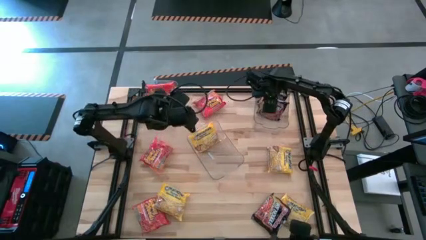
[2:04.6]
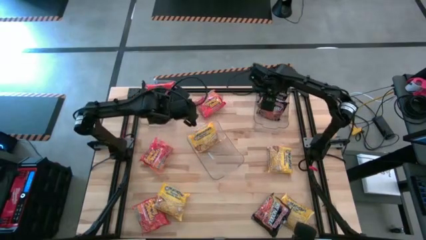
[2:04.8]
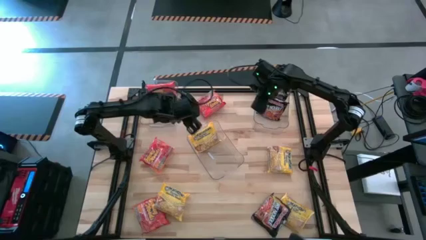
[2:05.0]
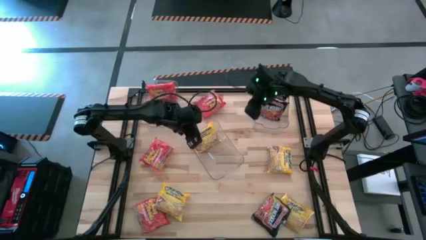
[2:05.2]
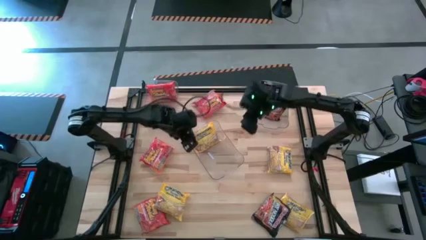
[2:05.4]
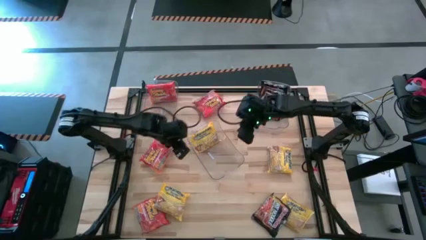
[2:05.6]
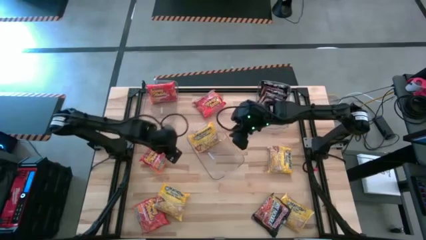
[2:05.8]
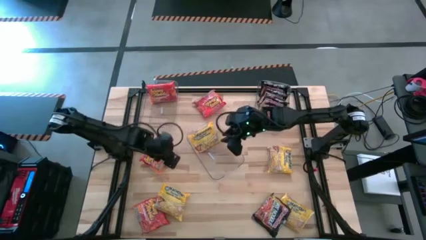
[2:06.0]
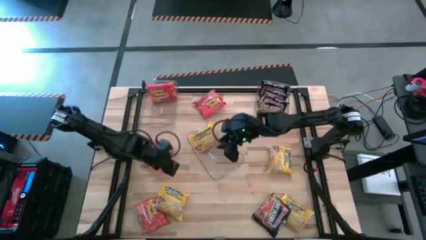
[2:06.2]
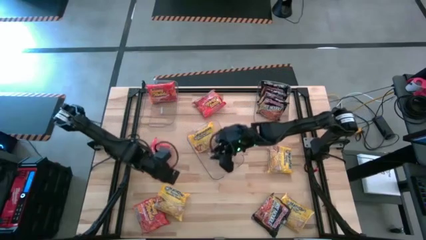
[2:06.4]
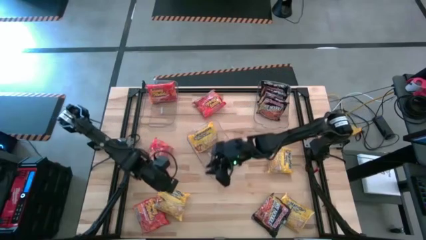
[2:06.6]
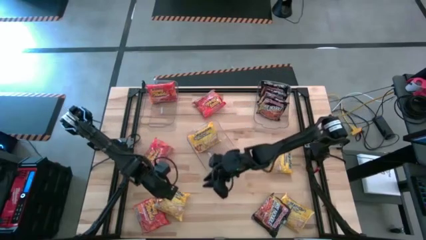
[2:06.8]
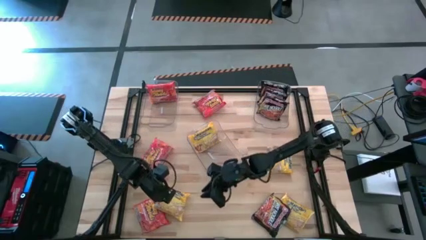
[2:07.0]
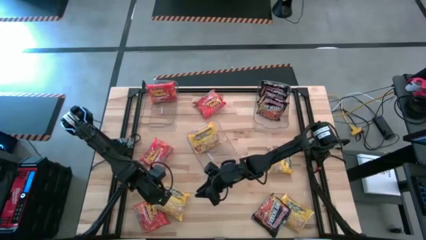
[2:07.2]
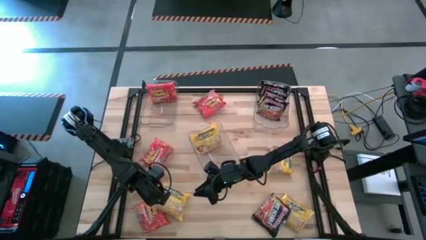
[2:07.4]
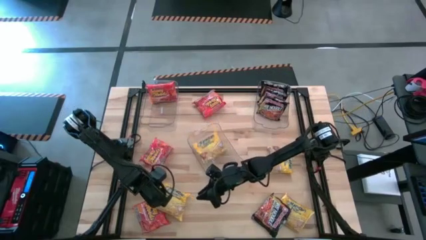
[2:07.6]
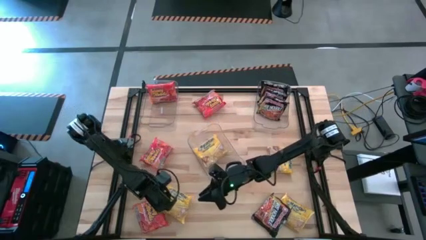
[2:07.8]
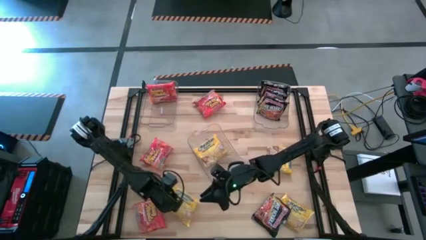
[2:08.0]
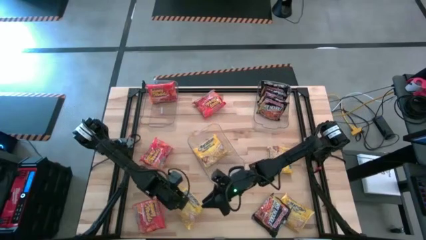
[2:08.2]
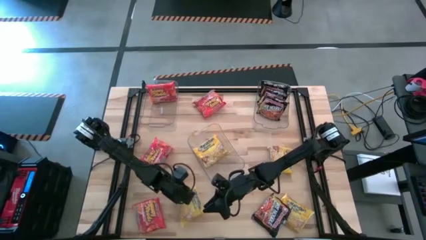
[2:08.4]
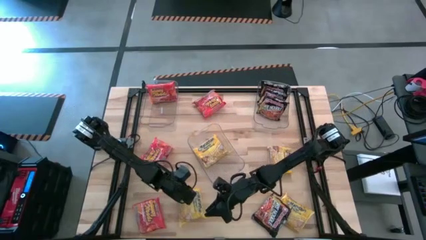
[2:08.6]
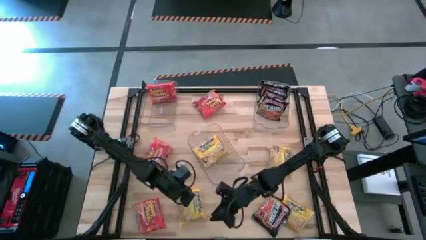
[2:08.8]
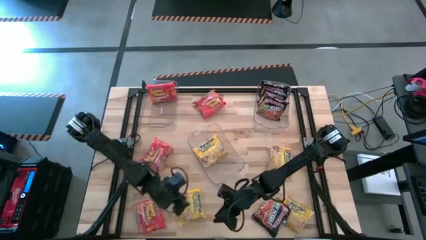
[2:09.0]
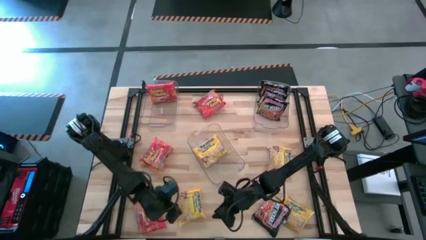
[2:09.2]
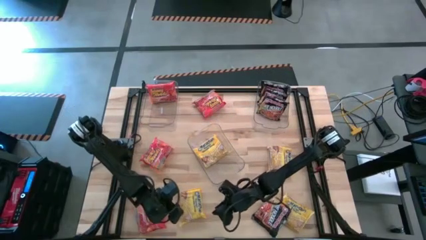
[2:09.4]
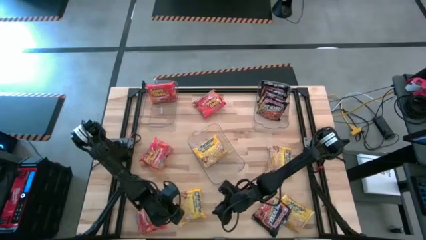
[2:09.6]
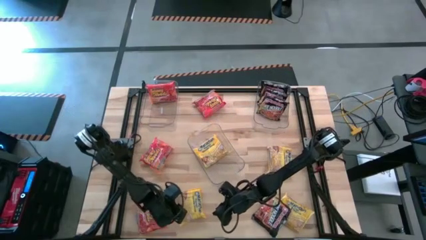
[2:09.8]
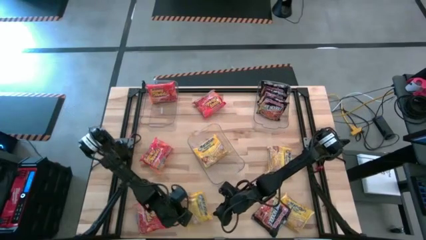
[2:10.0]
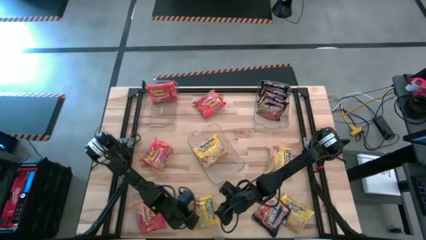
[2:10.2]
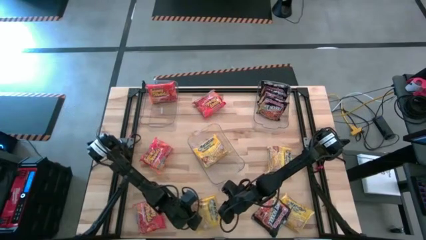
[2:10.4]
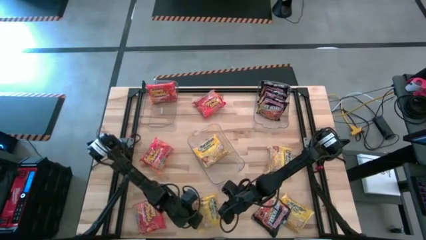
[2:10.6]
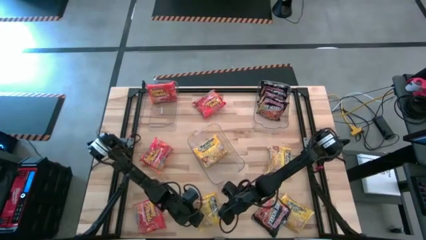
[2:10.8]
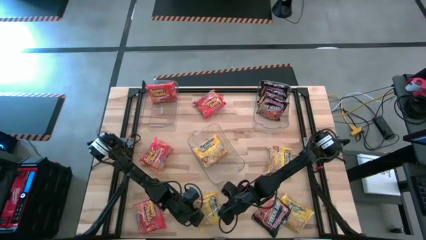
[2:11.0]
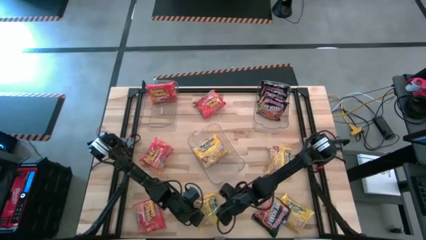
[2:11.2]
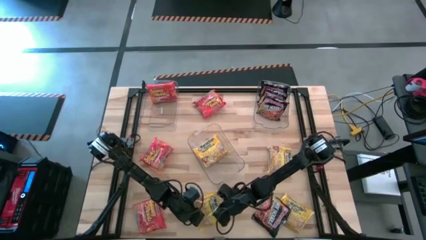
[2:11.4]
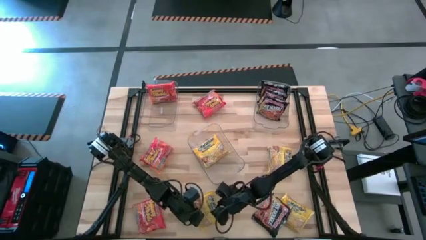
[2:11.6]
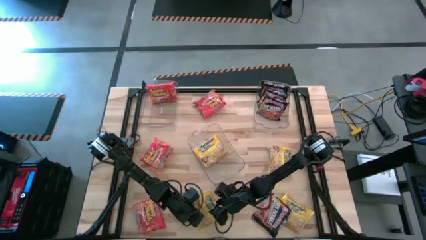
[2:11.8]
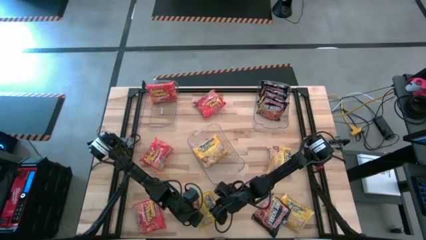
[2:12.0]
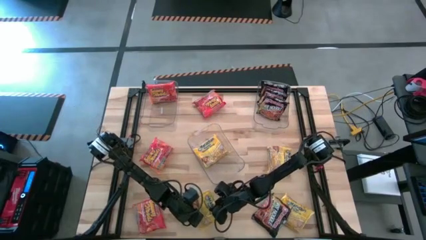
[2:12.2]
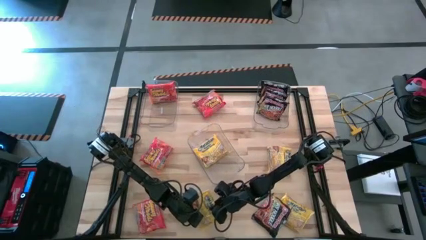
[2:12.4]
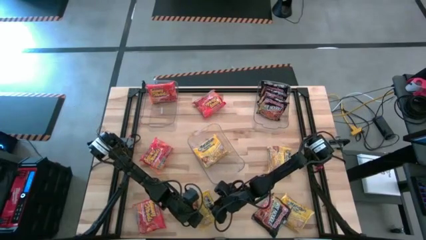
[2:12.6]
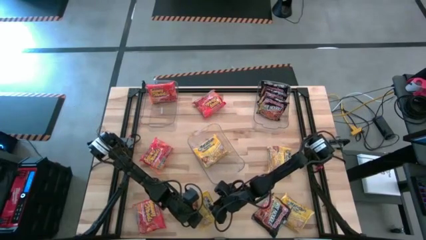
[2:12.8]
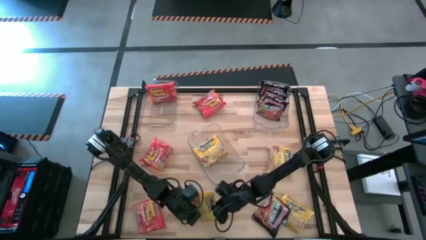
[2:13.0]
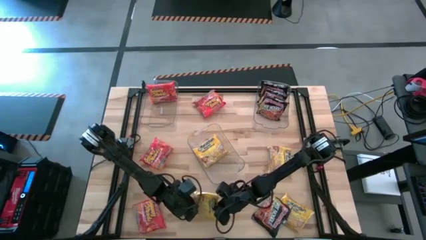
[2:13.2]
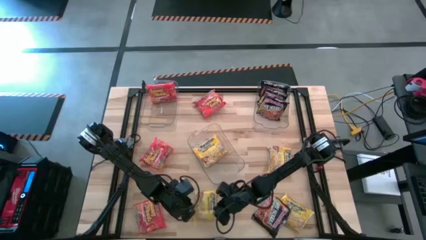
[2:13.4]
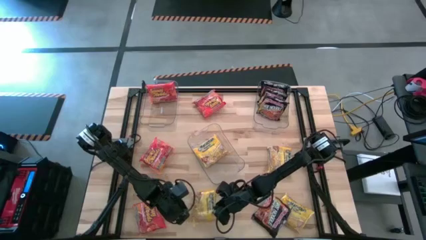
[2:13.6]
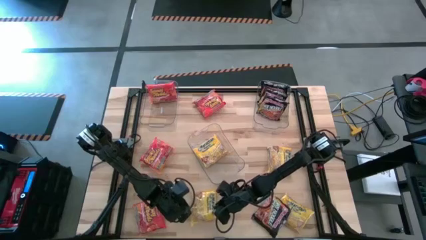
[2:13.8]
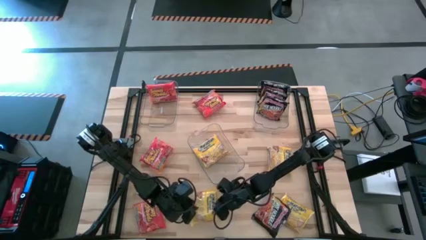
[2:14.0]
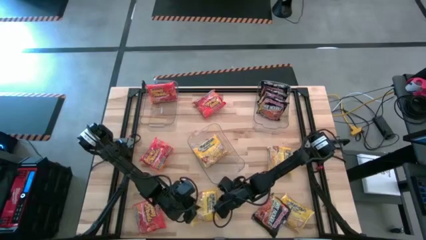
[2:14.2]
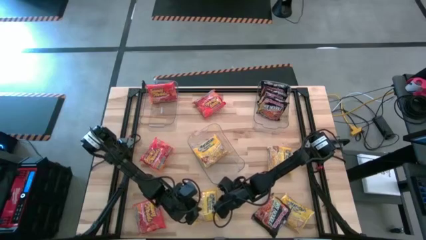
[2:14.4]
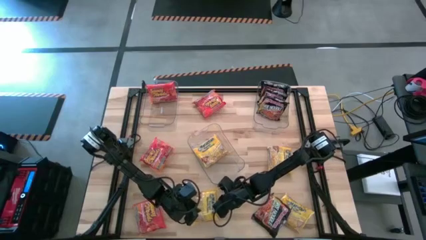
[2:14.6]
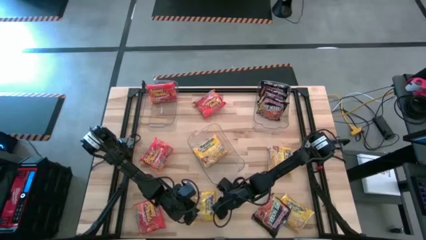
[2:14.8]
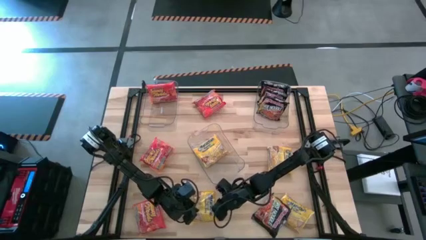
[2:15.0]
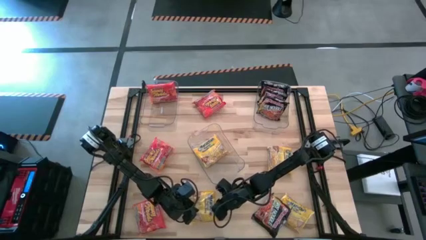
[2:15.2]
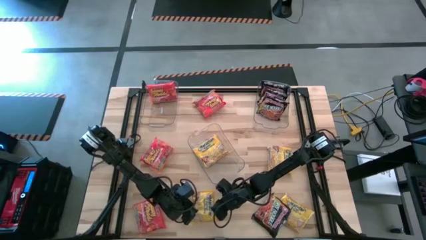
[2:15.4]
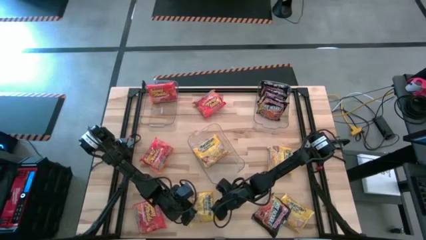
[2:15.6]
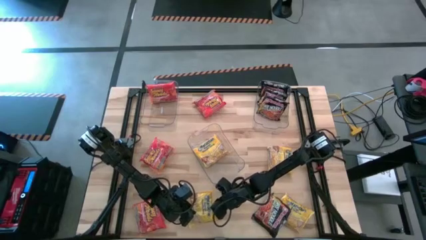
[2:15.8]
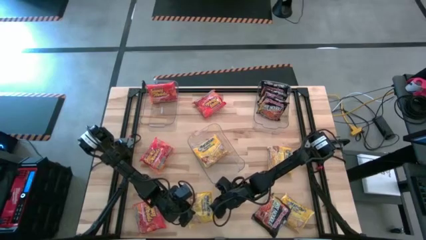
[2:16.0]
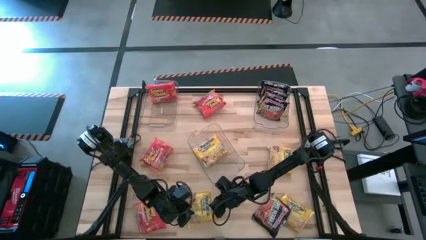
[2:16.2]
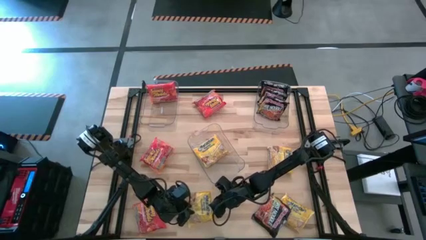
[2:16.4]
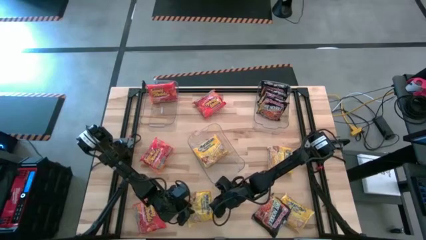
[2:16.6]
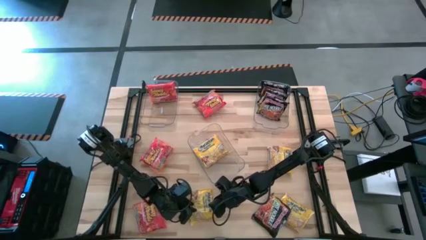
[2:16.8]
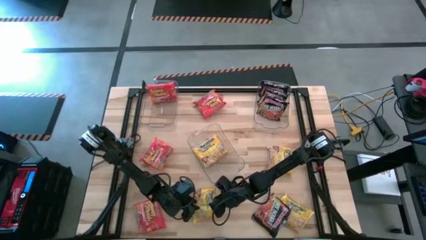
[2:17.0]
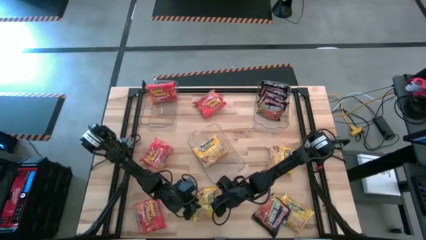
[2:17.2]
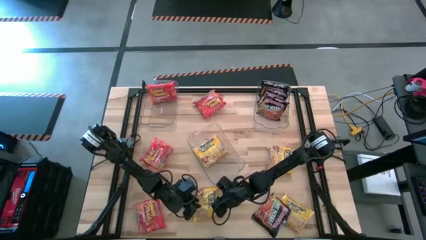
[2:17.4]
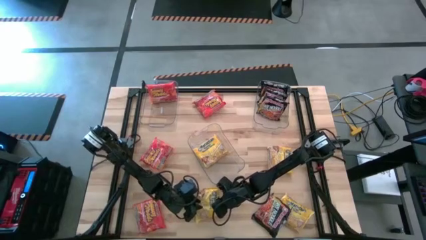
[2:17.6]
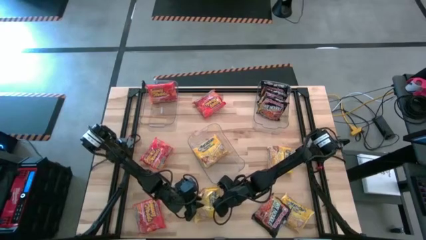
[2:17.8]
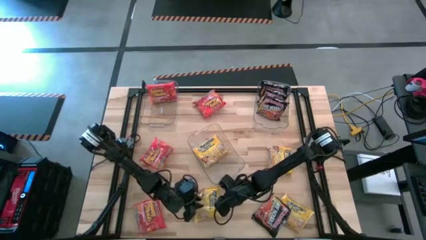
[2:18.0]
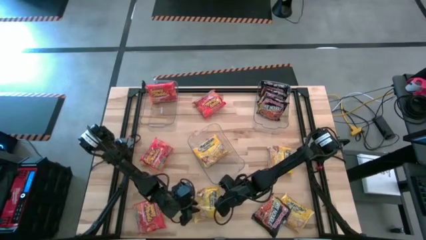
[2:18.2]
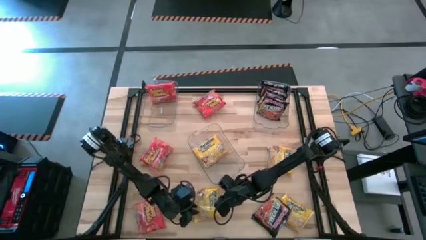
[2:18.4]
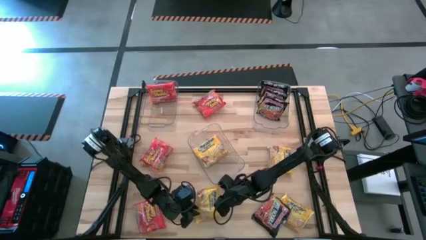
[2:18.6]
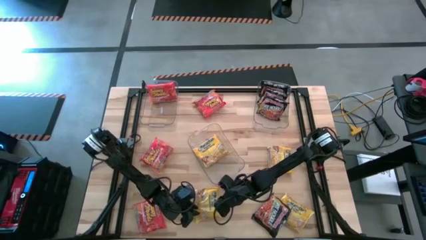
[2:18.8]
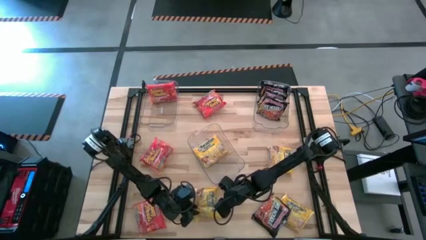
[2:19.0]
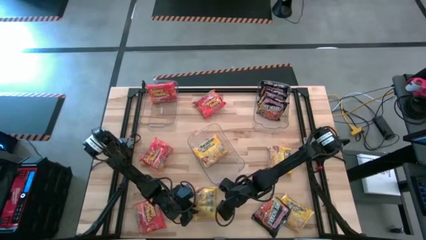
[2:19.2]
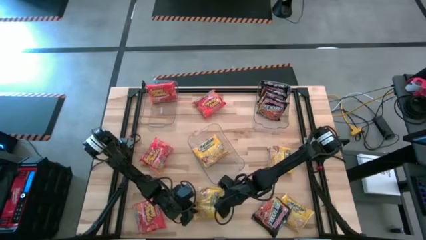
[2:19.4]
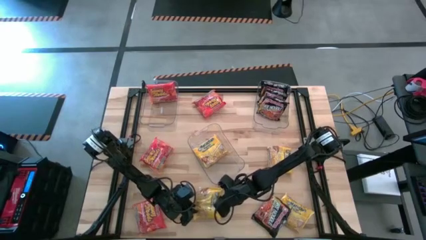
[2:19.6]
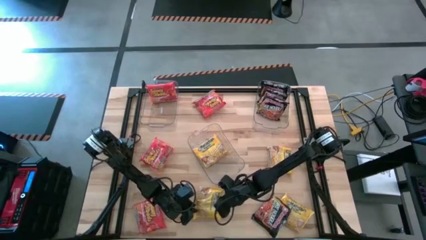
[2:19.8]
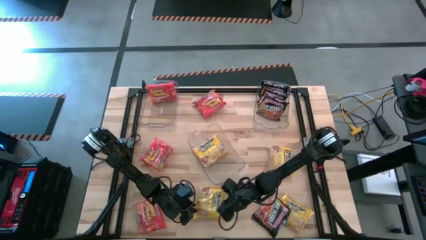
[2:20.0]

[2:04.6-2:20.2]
Task: Sort Maruchan noodles
Put the bottom left yellow noodle pack into the center transparent bin

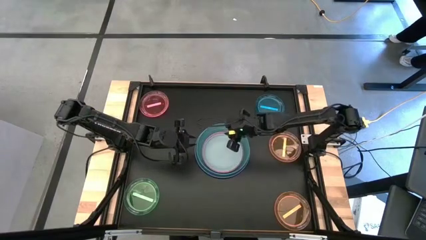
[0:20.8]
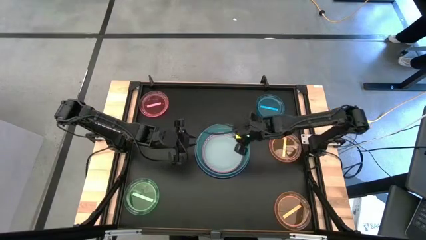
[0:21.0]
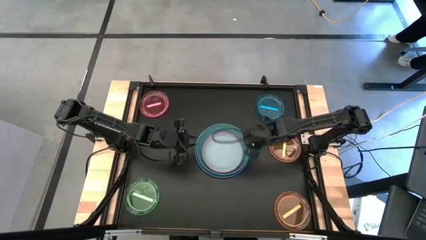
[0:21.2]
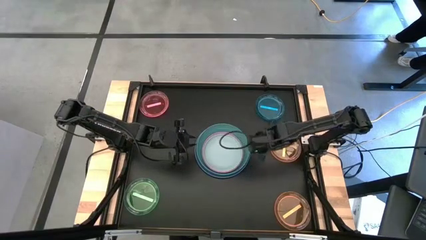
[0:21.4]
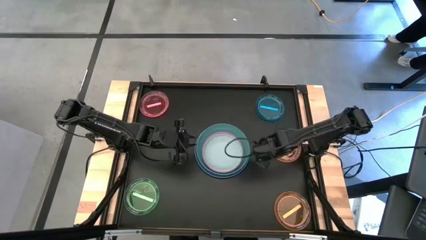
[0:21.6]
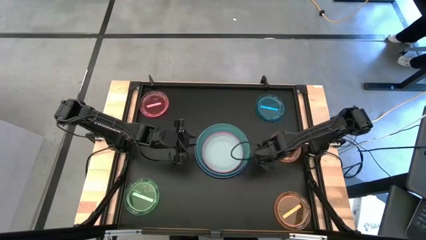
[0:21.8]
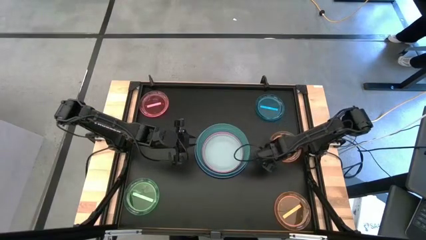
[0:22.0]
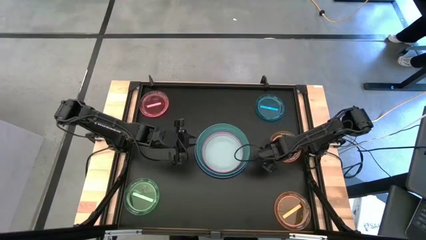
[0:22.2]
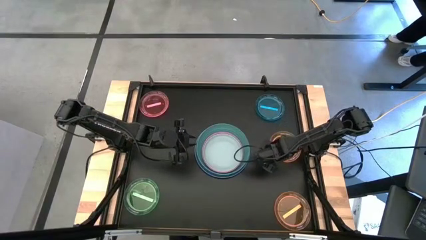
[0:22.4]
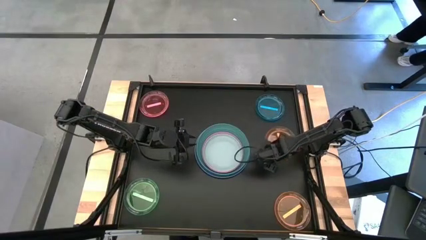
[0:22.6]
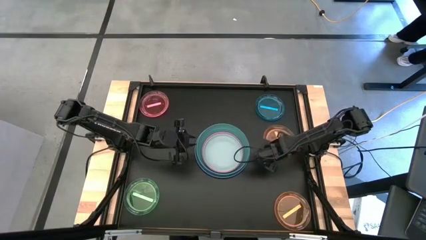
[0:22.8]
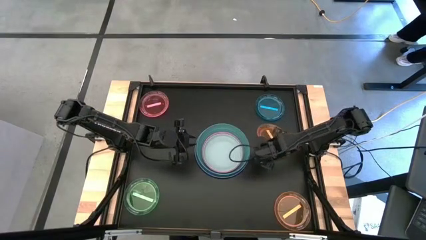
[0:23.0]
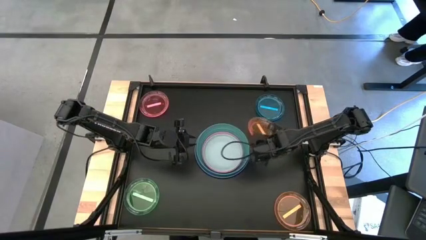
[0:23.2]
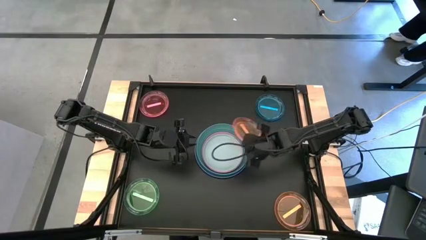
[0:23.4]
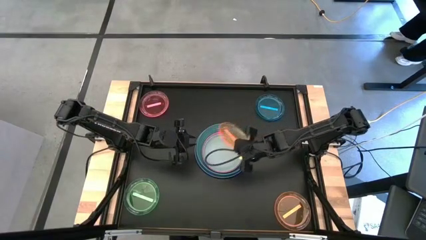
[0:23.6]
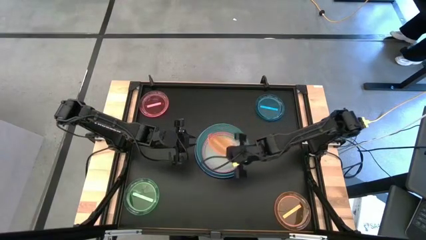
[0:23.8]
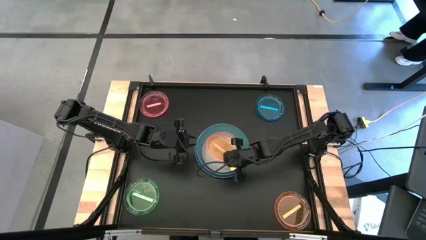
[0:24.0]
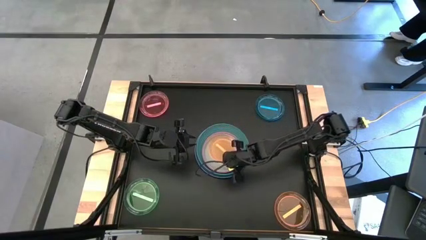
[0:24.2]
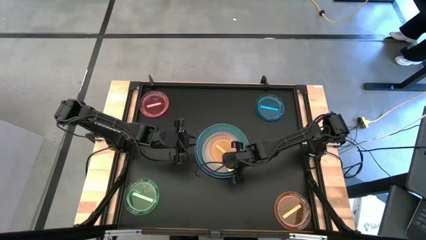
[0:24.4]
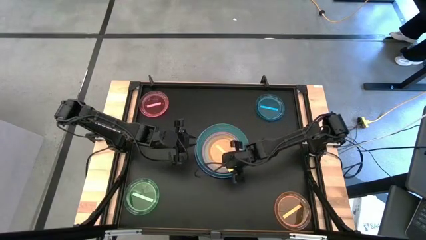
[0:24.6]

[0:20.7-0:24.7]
Task: Stack plastic plates
Stack the top orange plate on top of the gray plate
